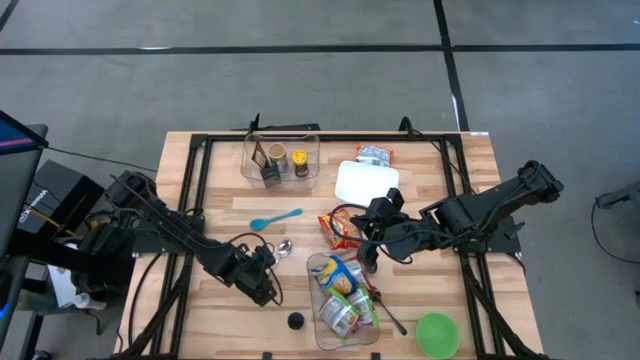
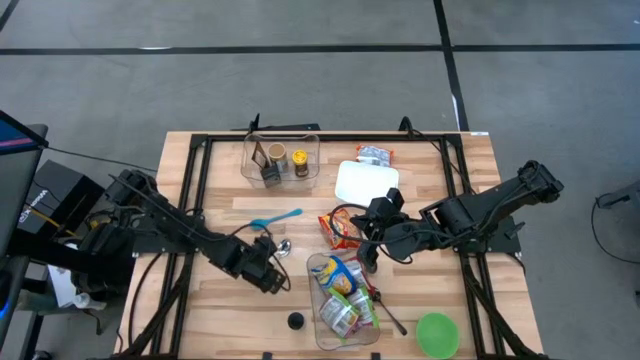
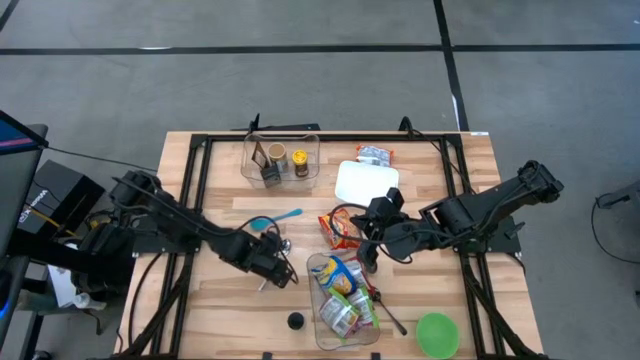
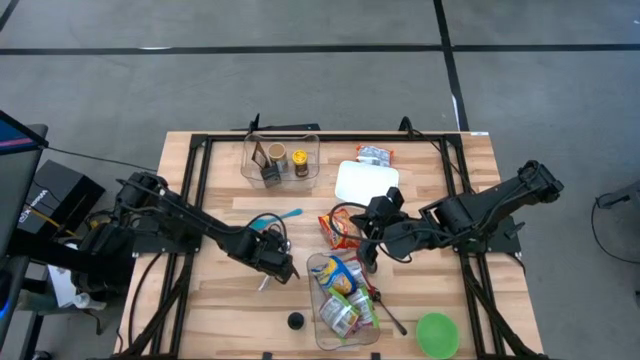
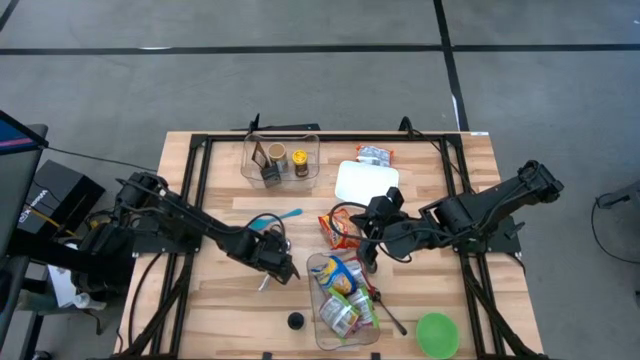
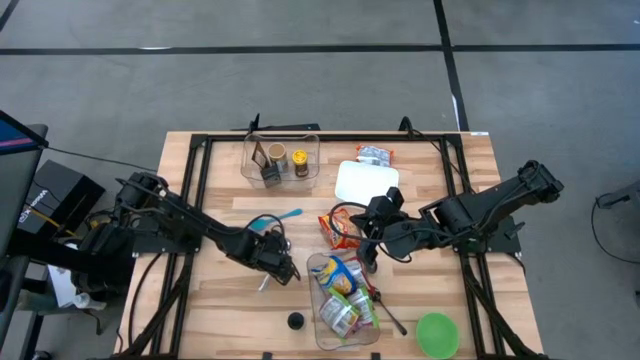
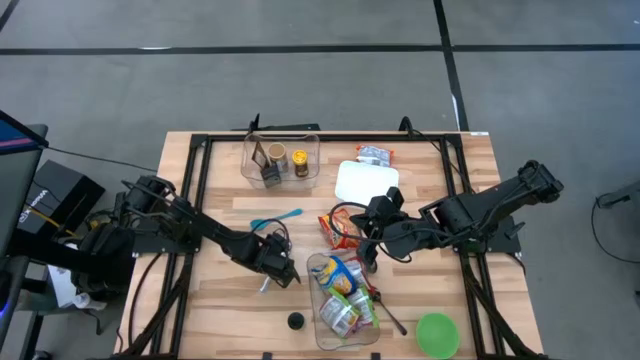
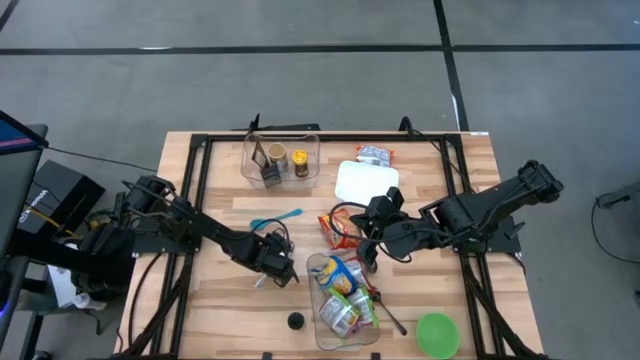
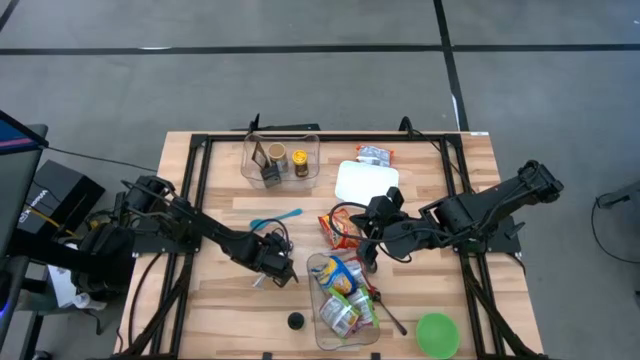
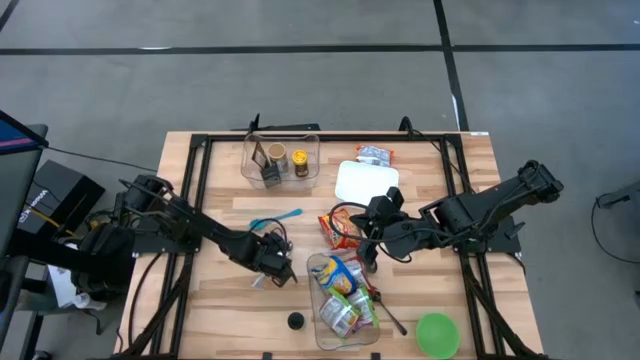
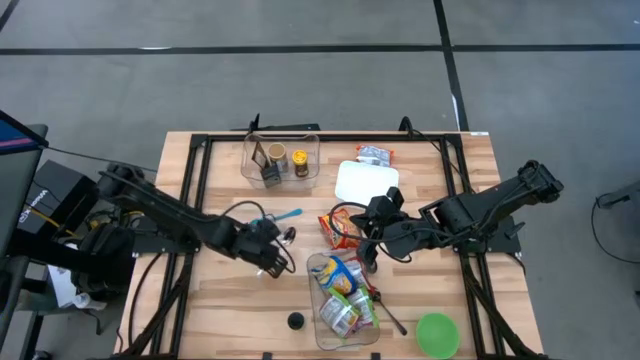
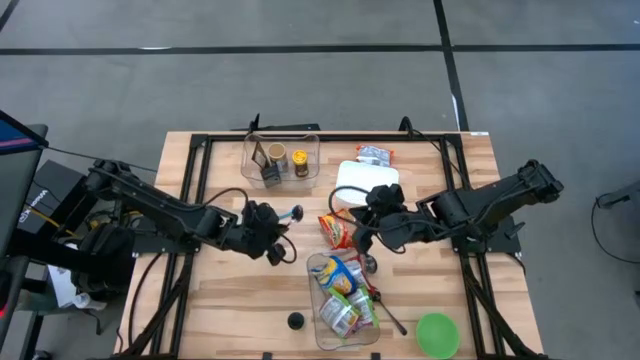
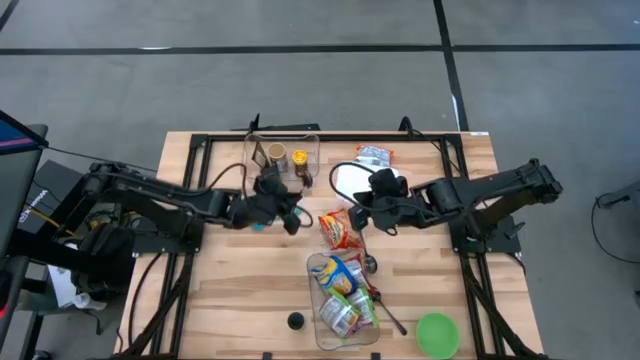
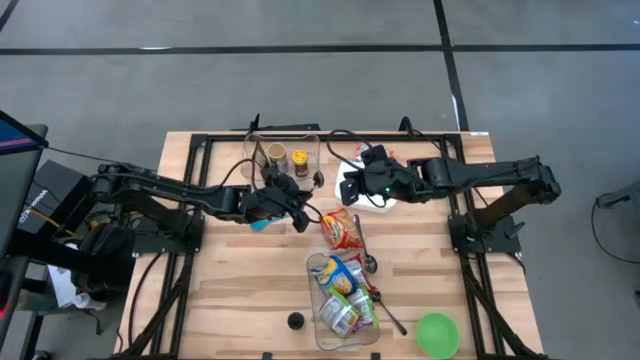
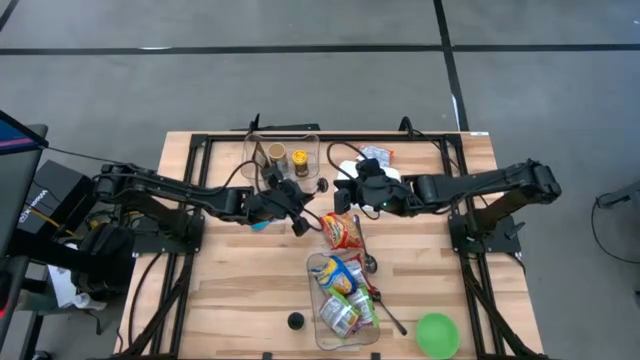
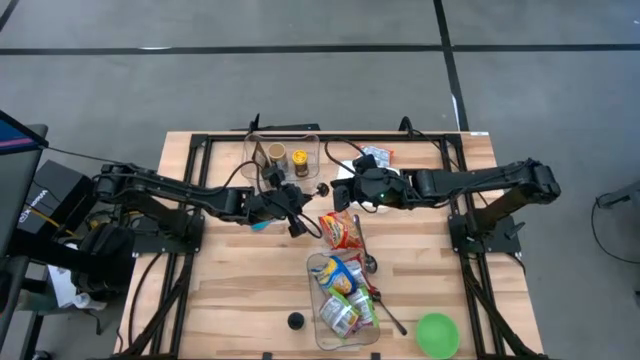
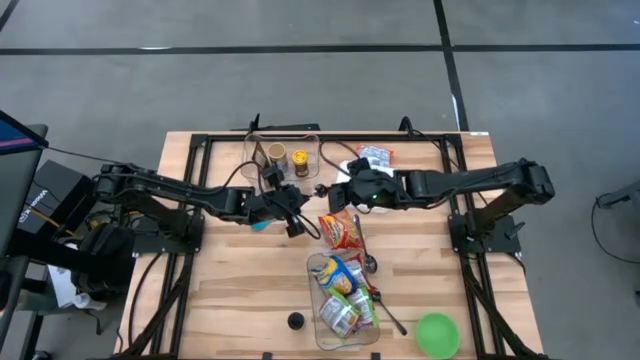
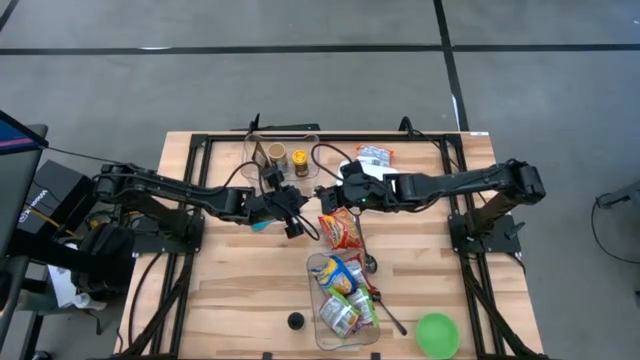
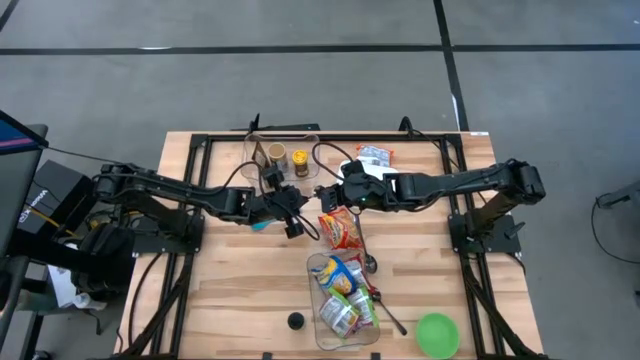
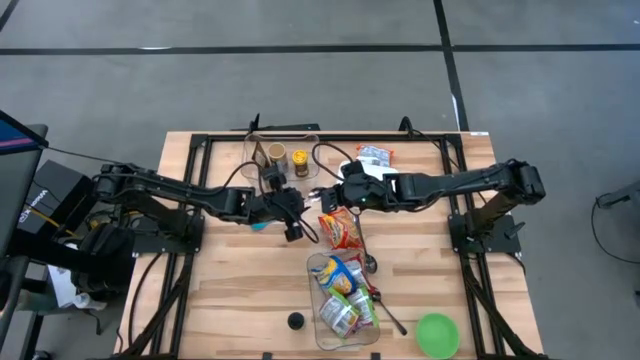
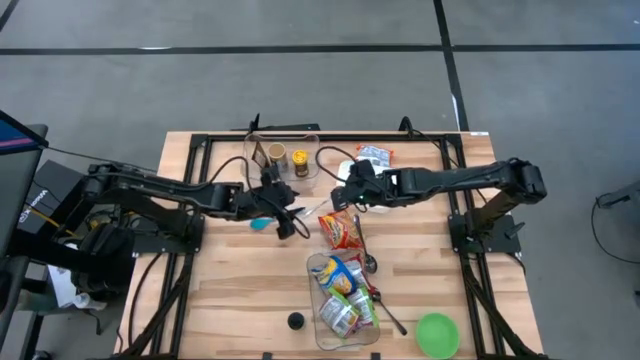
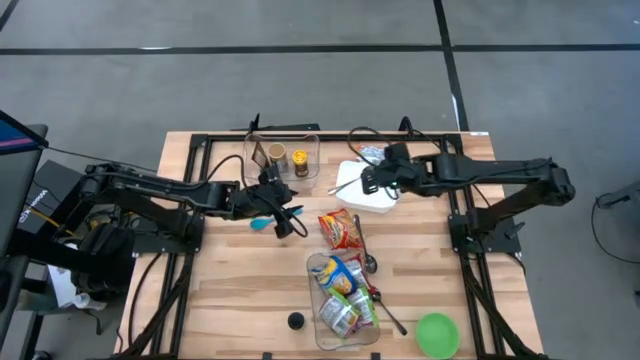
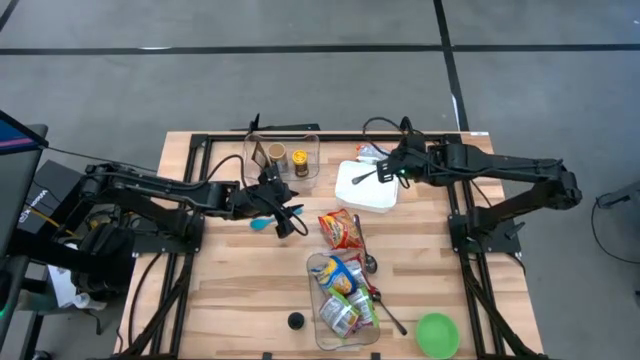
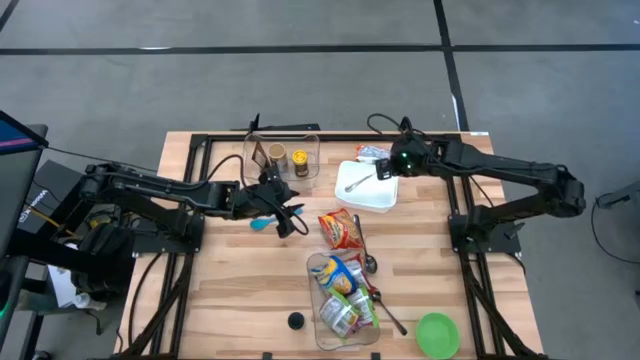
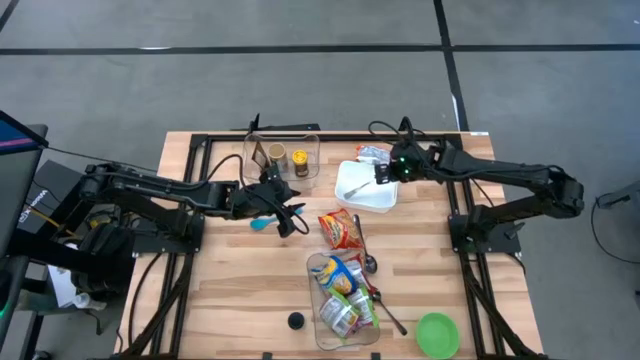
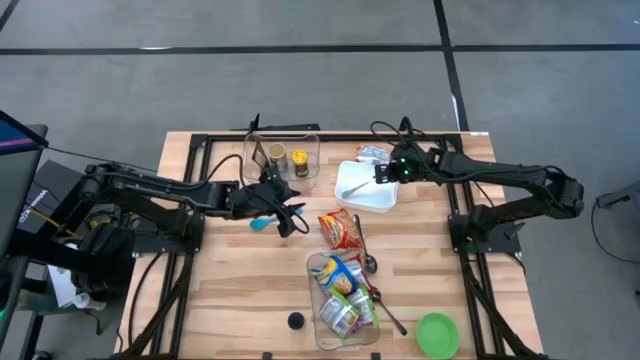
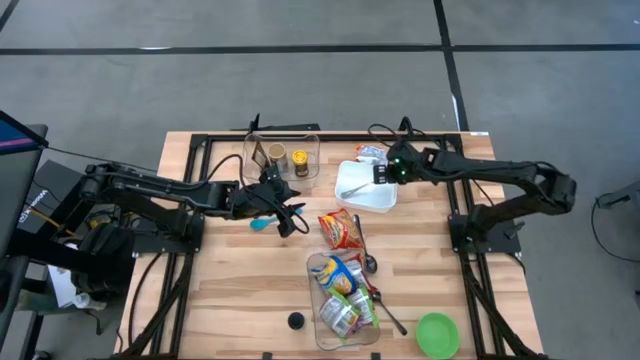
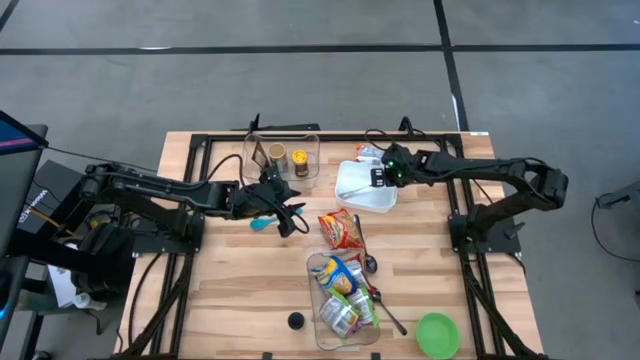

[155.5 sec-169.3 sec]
Task: Pick & Place Food Item
Put the silver spoon into the white bin

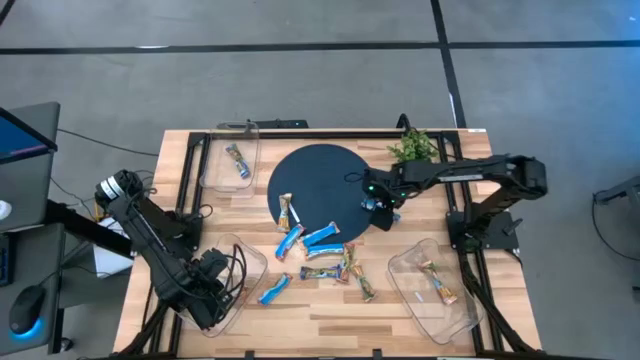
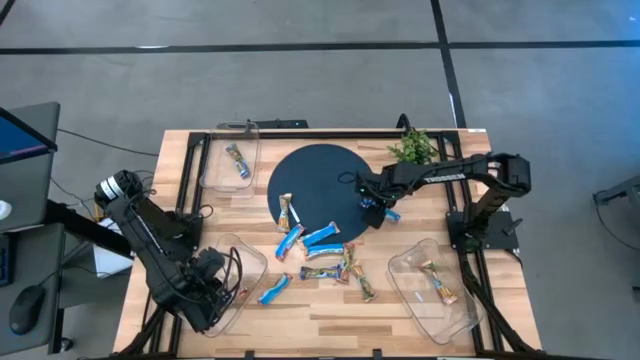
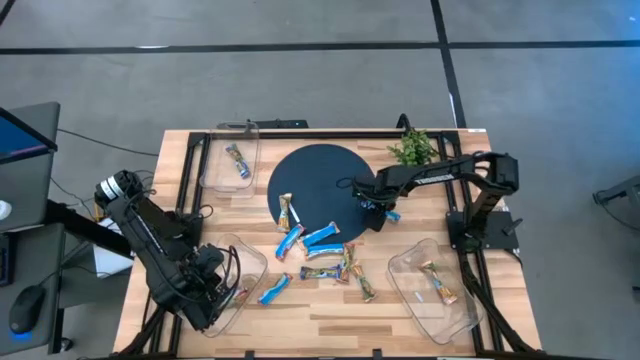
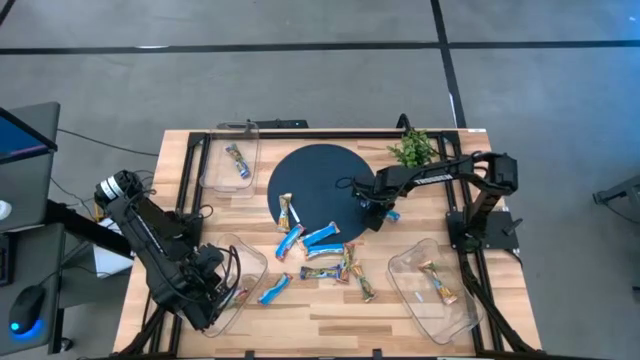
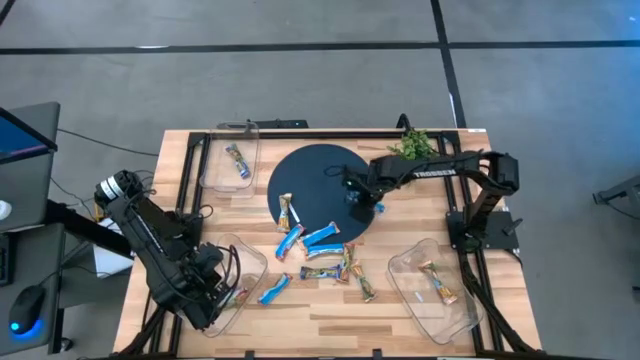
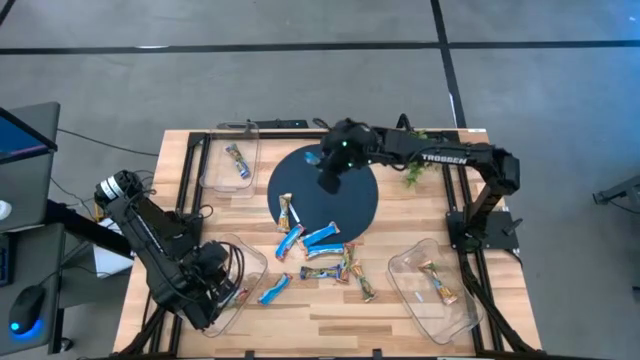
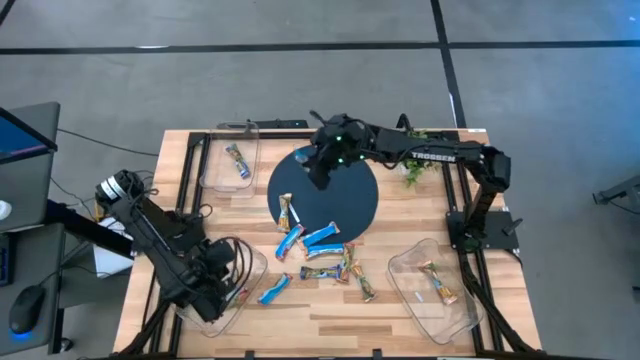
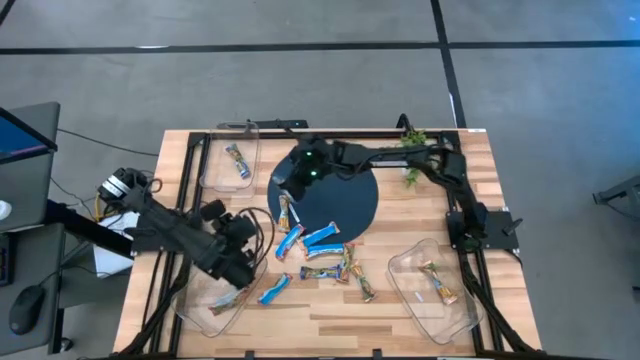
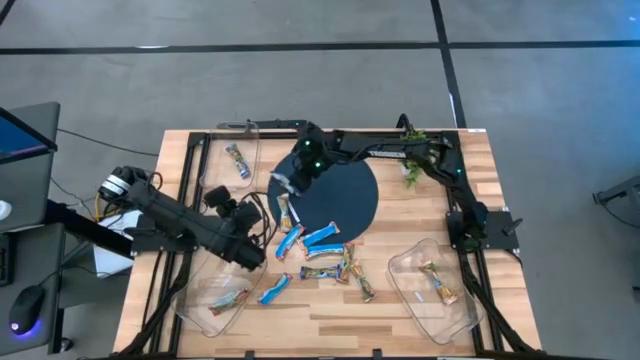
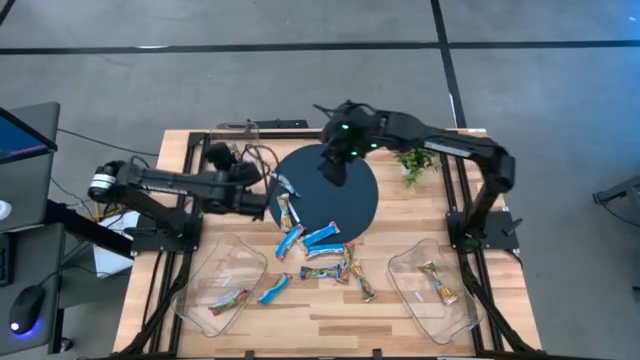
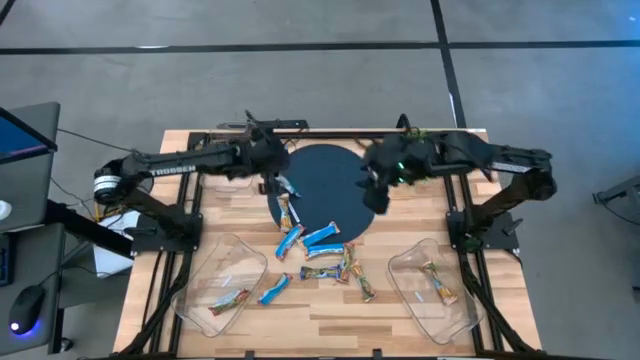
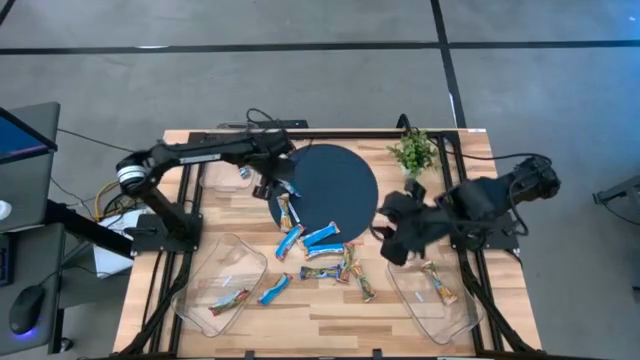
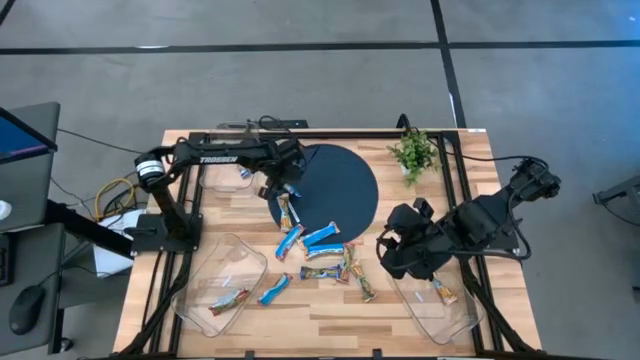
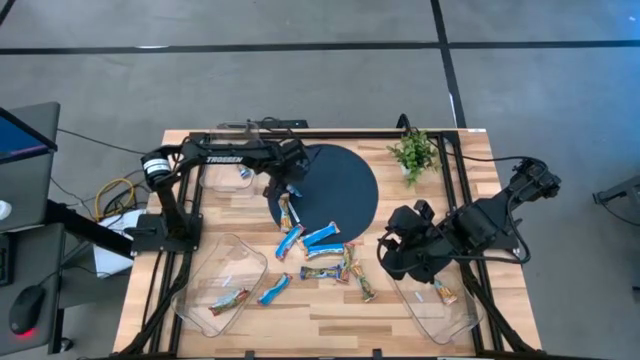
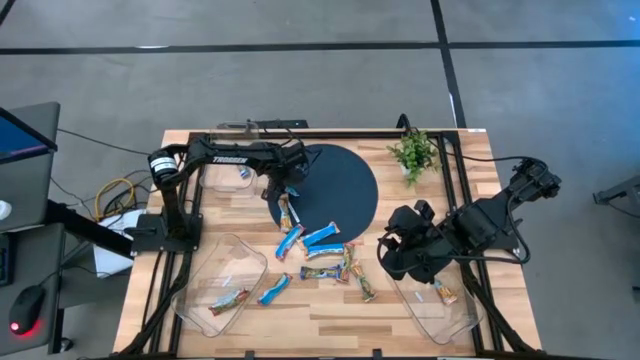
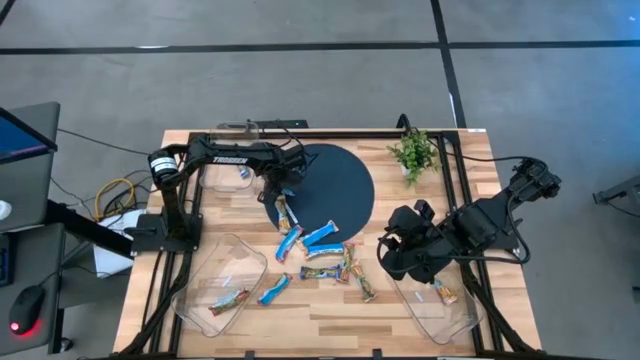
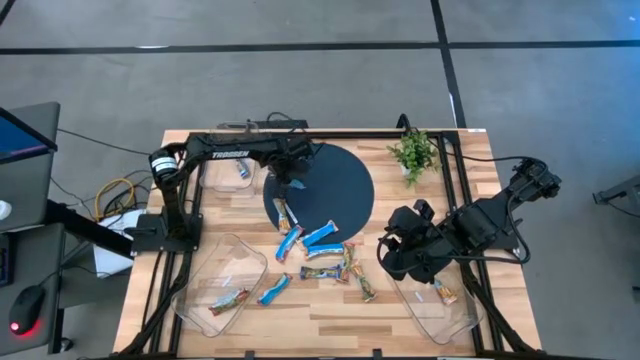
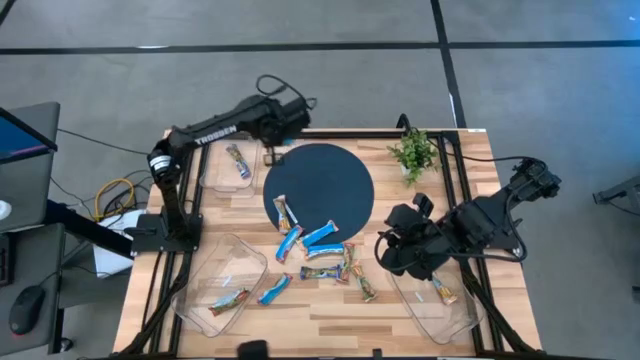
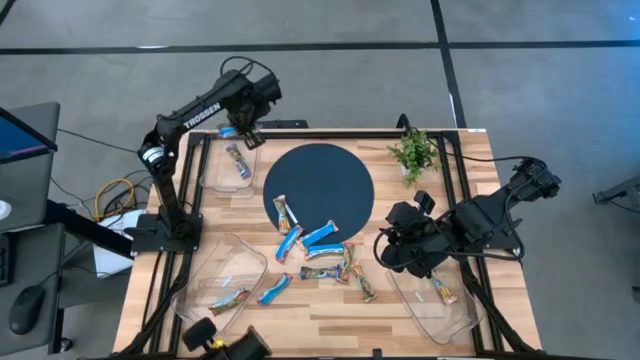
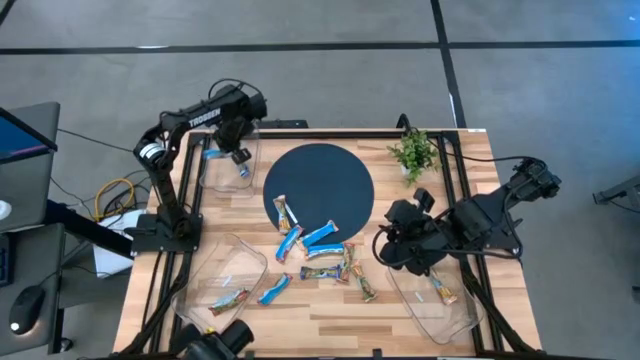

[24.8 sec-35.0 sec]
Task: Pick and place Granola Bars by type
Put the blue granola bar into the top transparent bin
